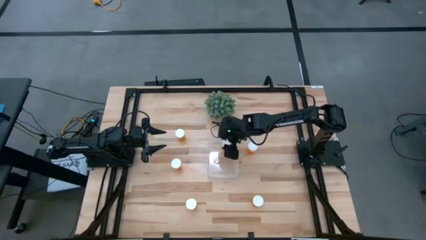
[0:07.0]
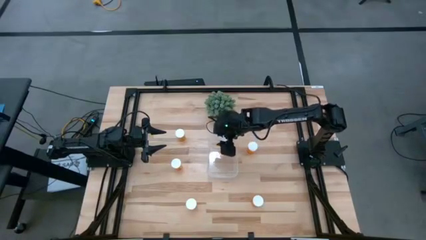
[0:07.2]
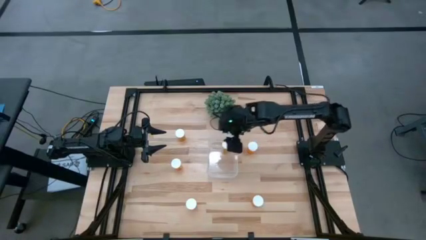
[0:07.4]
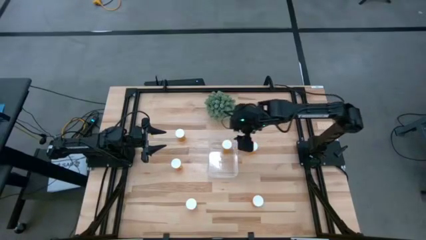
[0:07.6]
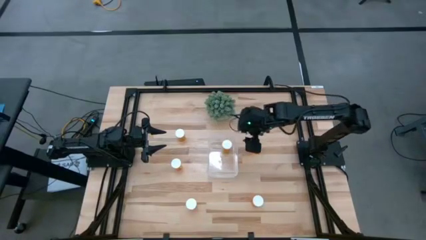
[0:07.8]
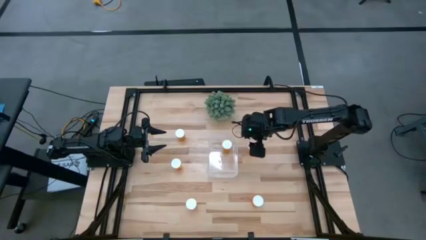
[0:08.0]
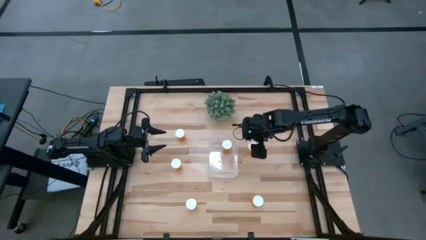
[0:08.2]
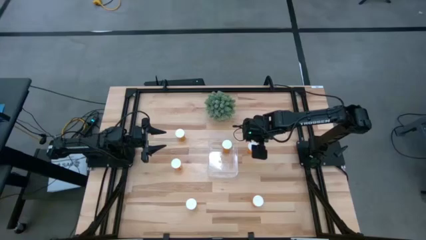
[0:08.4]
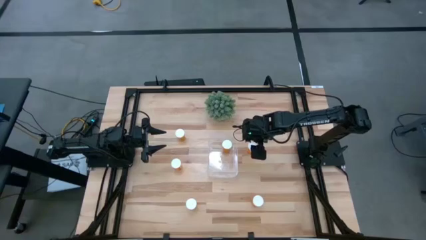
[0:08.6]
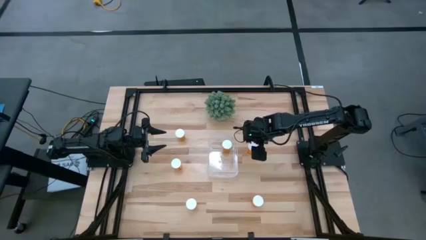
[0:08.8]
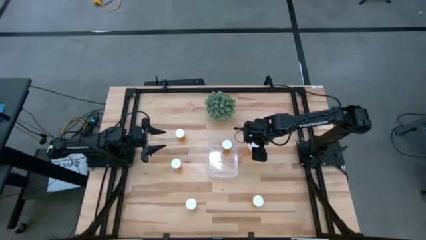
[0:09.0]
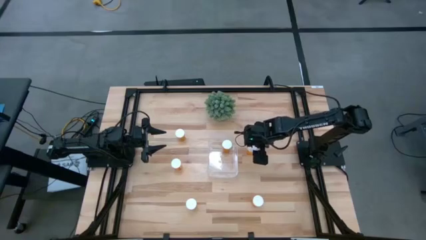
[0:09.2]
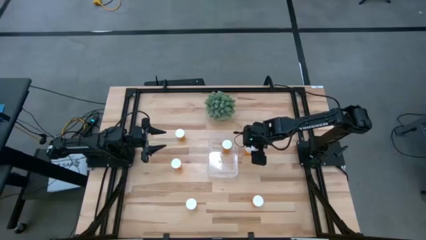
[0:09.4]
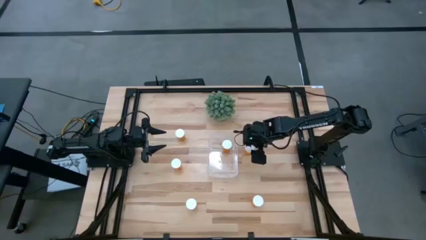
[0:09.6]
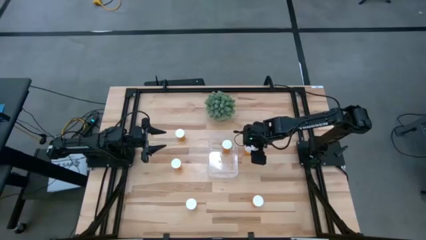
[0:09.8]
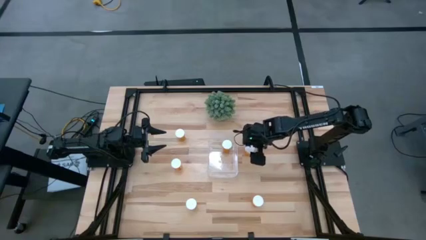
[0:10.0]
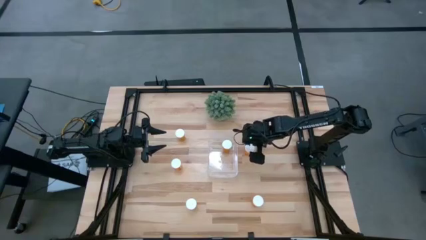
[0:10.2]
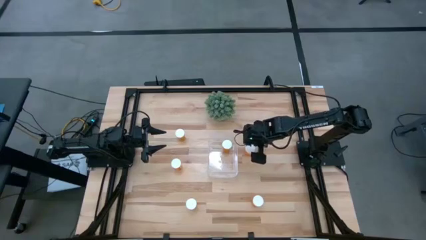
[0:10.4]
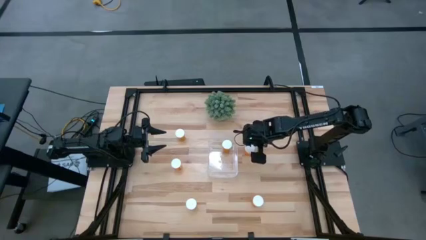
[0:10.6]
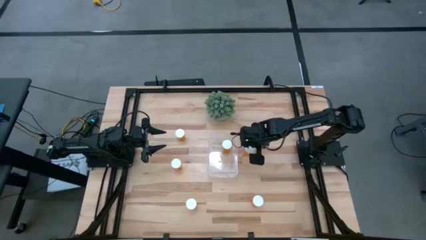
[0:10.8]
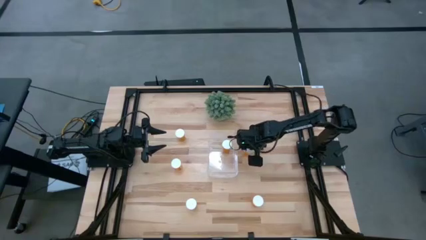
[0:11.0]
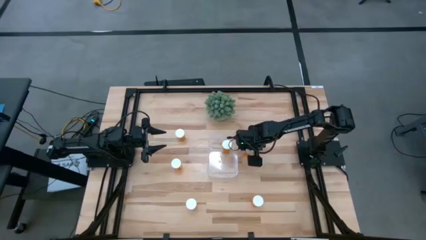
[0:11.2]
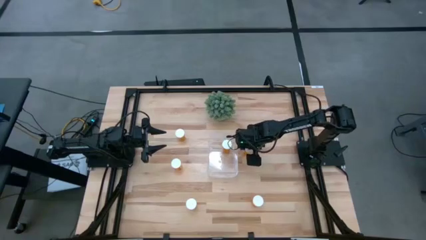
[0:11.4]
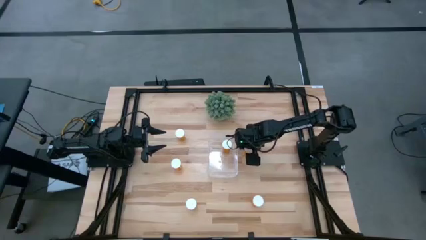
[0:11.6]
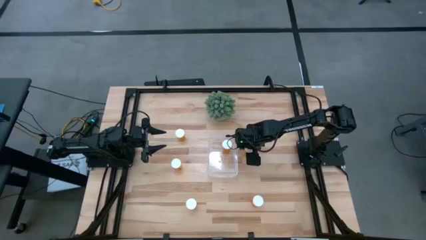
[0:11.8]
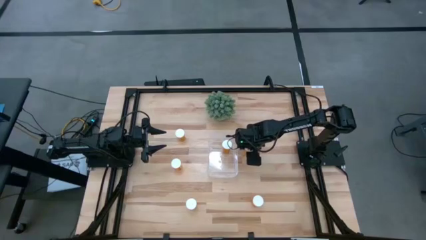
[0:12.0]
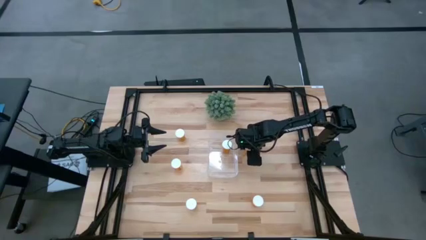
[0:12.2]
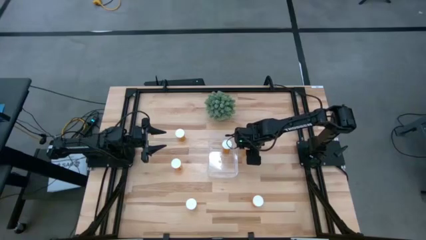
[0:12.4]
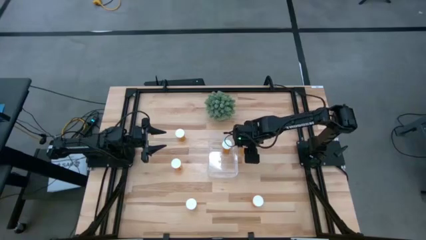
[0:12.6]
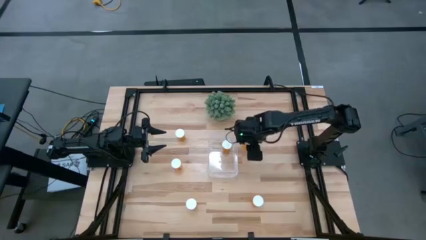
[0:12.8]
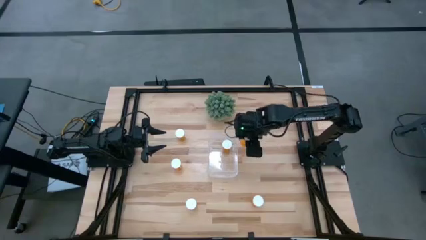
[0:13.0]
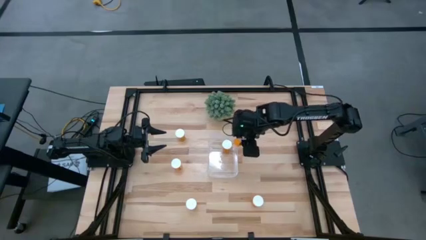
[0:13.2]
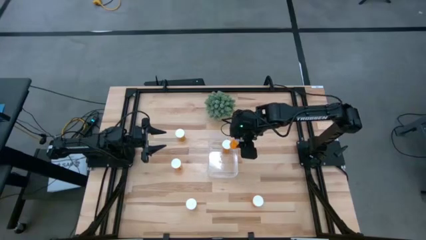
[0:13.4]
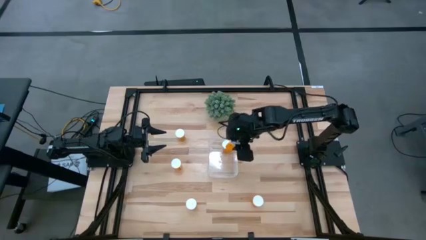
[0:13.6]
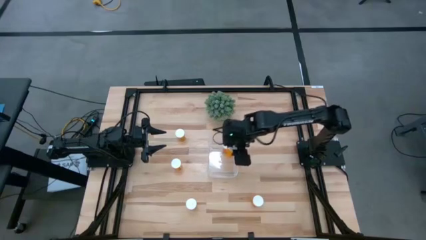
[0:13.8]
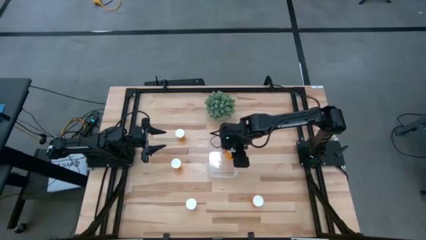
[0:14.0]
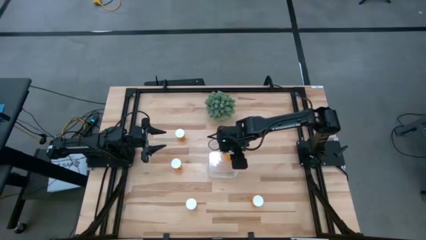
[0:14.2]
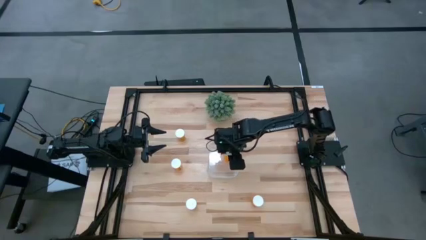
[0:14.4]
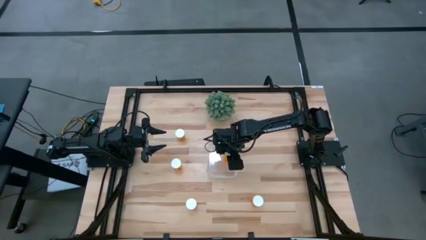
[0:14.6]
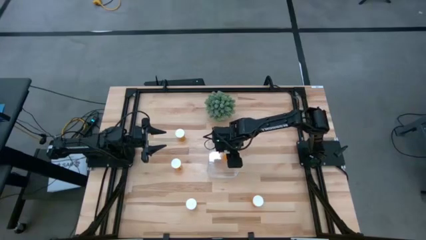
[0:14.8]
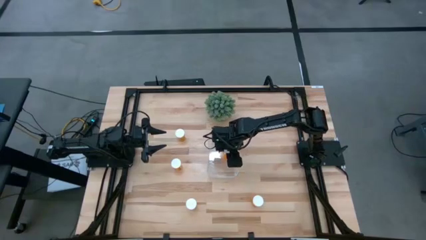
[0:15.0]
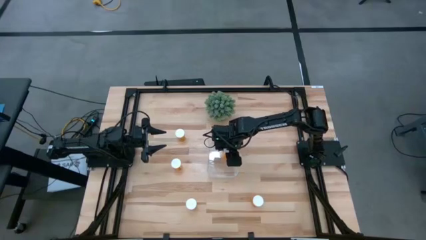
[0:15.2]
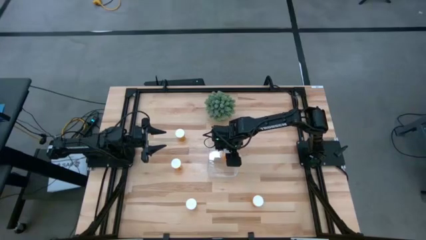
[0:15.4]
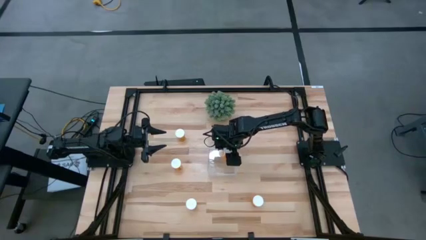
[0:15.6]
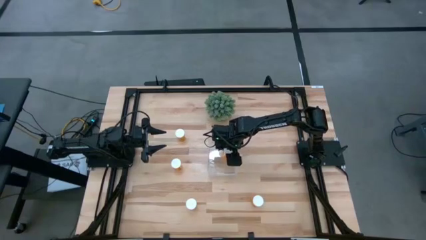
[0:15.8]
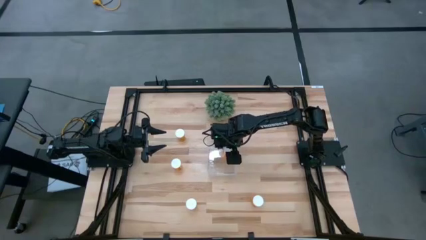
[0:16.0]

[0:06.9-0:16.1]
Task: Pick and place pill bottles into a basket
Put the orange pill bottle into the transparent bin

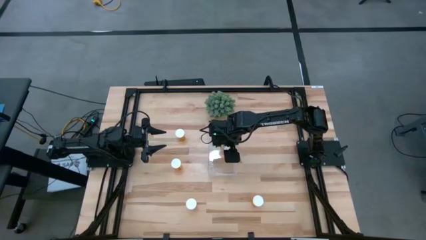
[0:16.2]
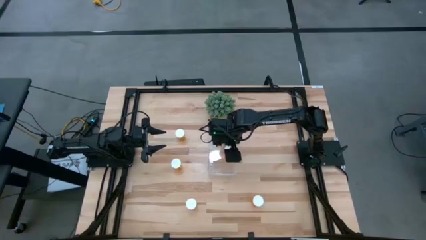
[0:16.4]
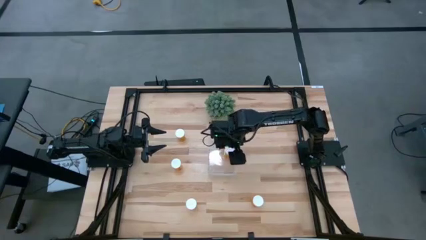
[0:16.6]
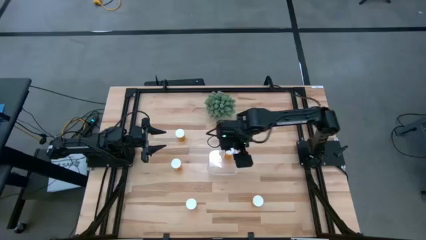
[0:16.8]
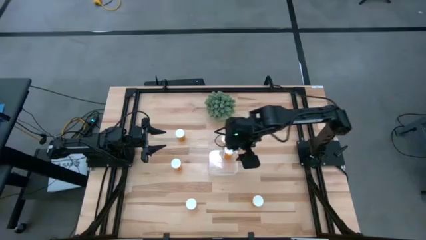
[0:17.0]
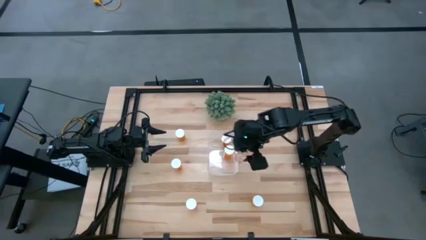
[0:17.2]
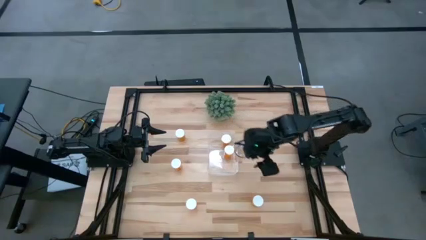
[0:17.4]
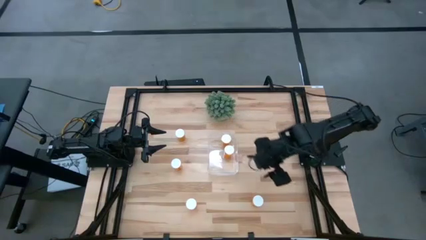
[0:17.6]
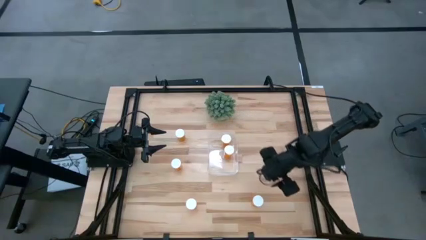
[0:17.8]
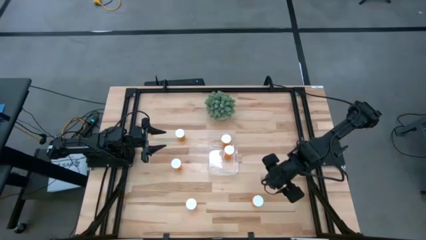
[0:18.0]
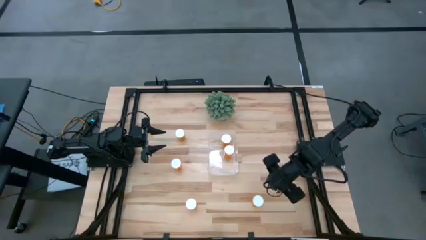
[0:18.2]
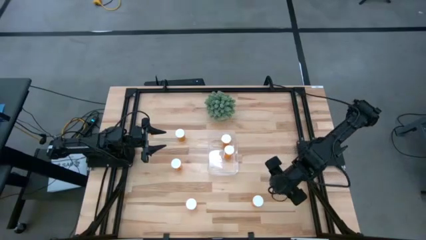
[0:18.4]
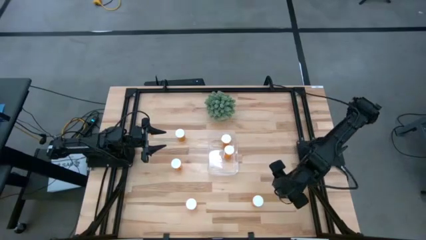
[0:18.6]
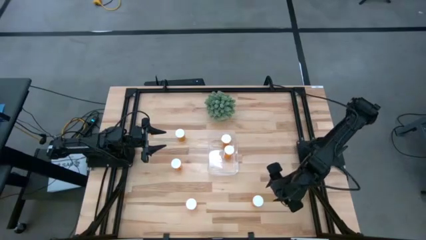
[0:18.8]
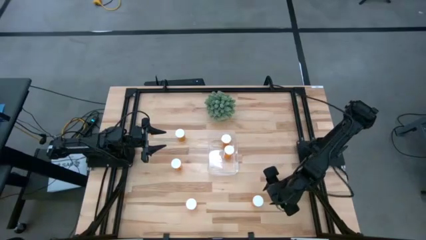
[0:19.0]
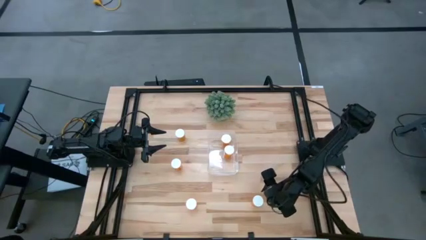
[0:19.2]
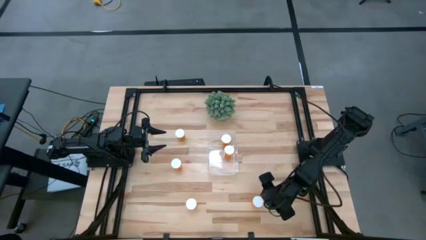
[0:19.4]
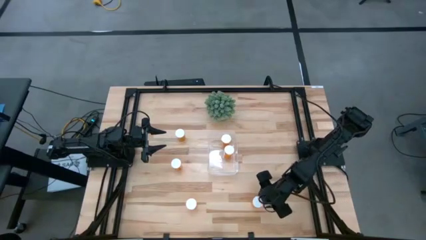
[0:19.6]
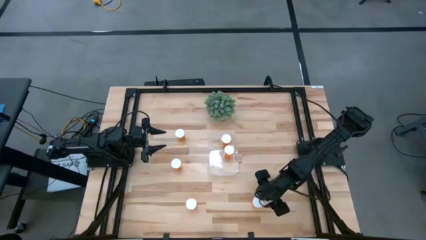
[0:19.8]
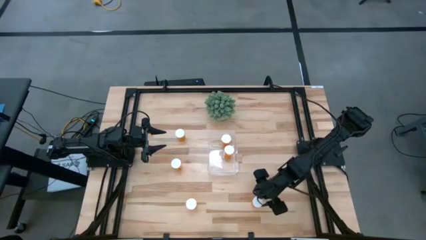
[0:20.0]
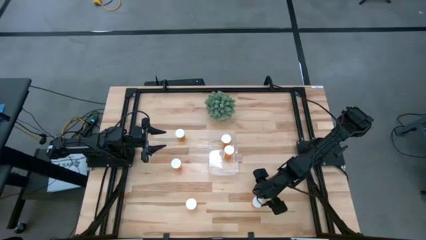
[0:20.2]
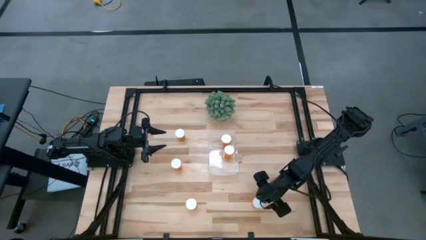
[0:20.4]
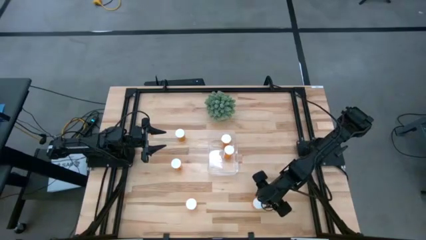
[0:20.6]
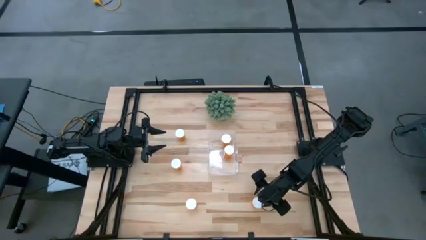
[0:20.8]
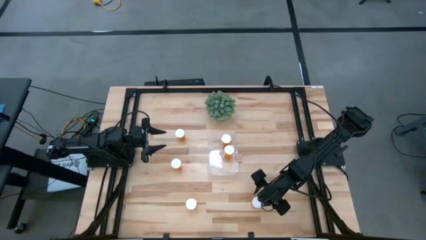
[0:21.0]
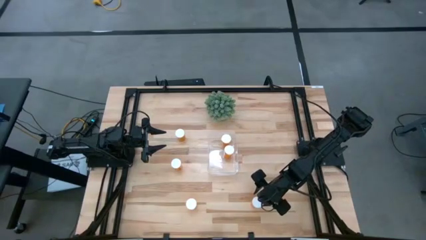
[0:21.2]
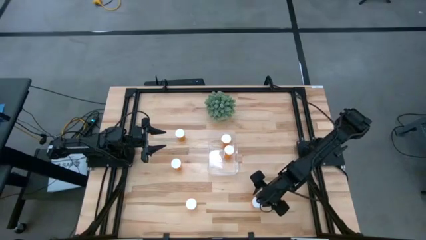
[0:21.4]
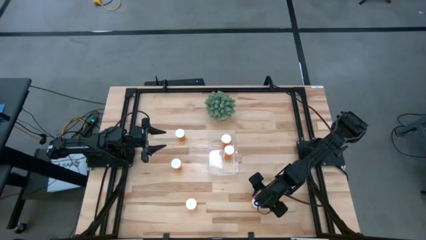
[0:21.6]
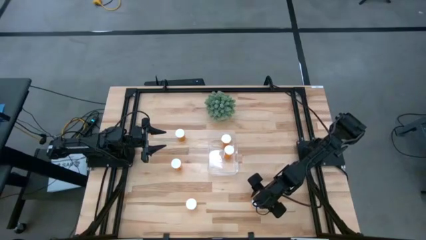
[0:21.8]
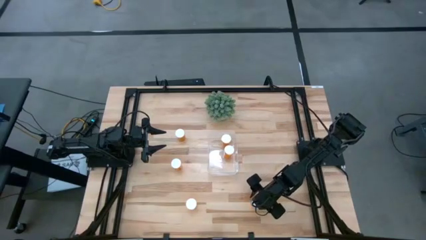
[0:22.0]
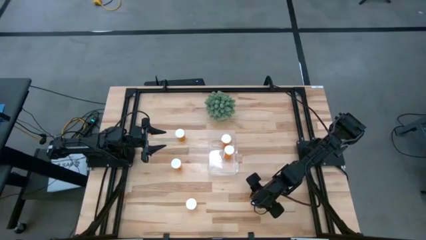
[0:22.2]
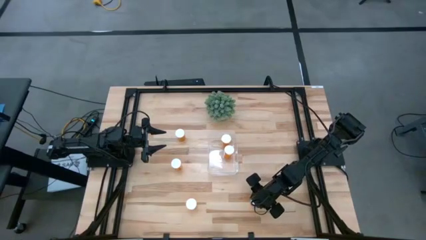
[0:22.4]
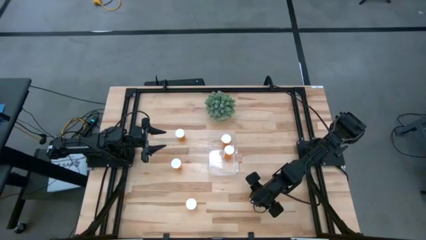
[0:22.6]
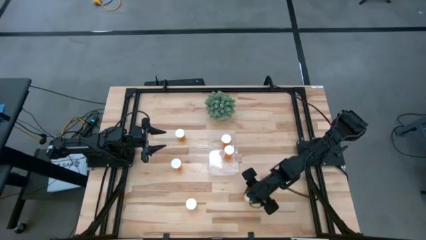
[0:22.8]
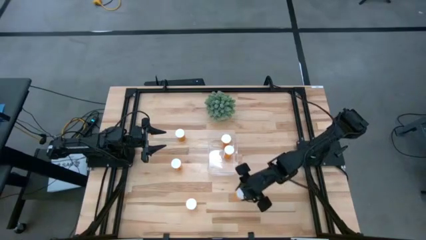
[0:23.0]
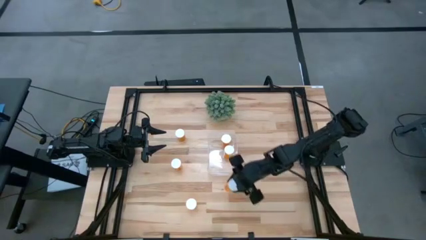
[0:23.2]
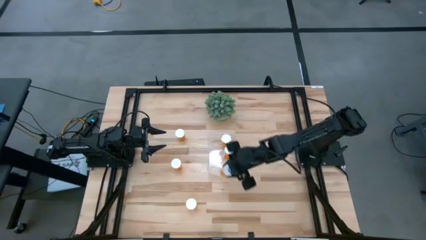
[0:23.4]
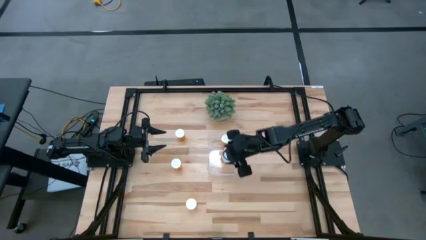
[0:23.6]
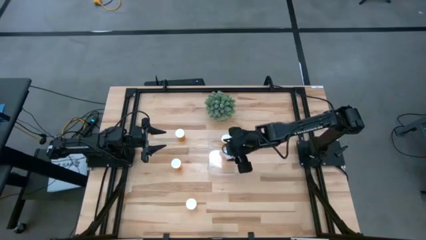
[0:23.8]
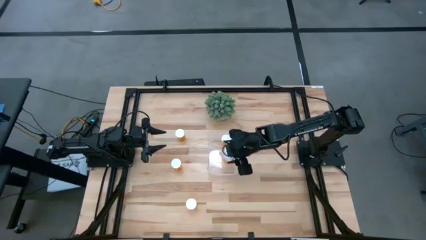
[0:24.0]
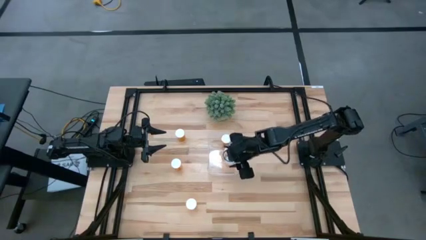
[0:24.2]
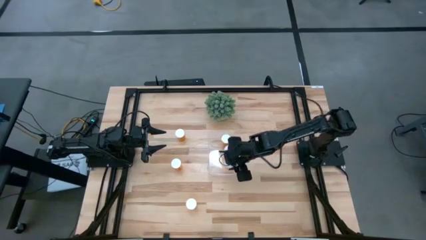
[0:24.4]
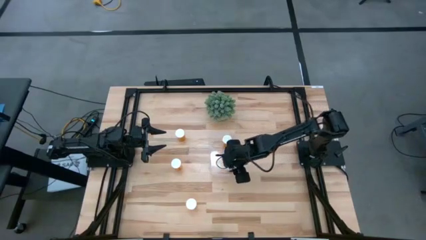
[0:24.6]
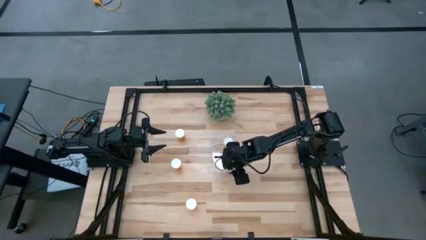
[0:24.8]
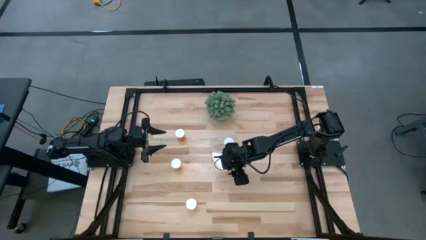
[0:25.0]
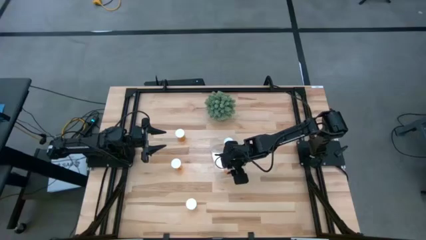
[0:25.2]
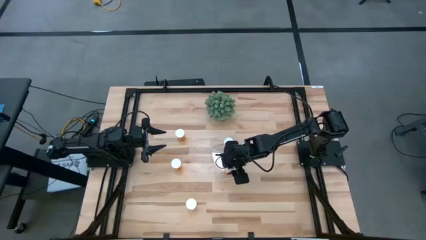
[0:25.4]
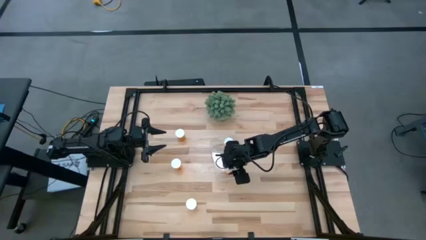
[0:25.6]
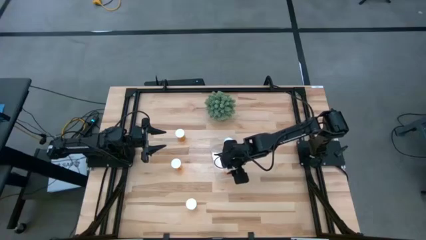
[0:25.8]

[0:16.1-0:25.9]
Put the orange pill bottle into the transparent bin
